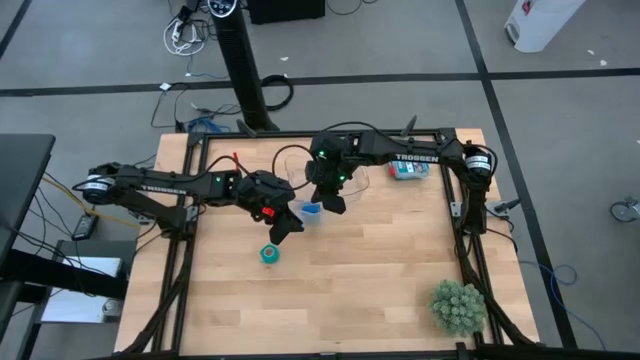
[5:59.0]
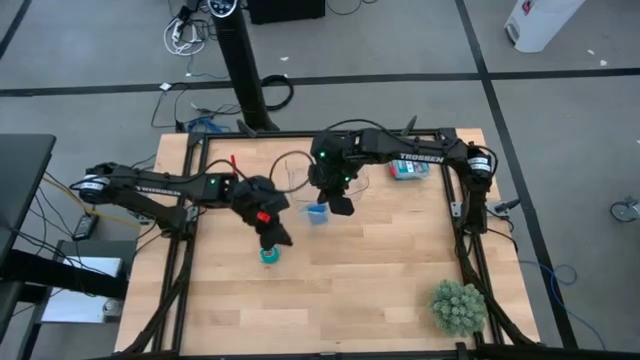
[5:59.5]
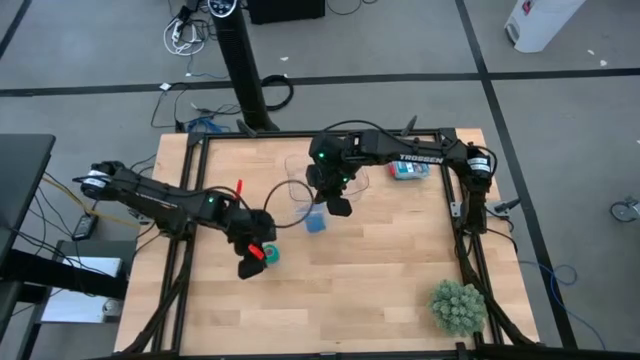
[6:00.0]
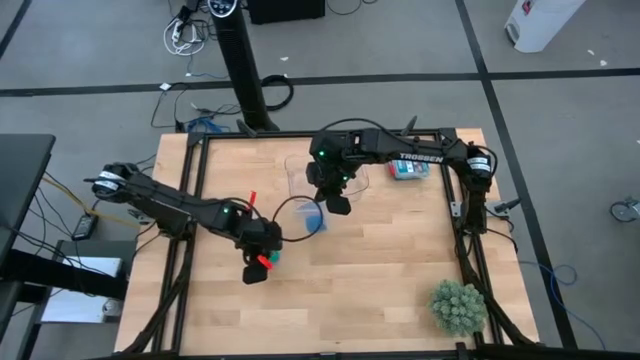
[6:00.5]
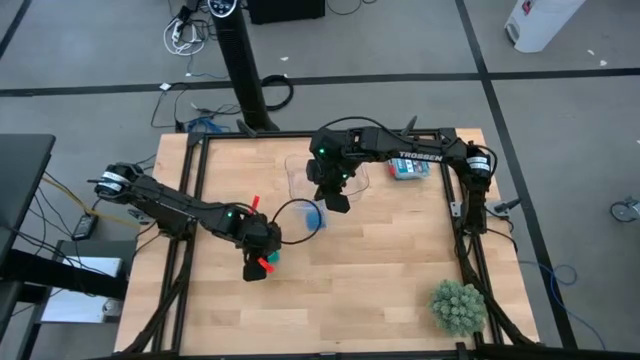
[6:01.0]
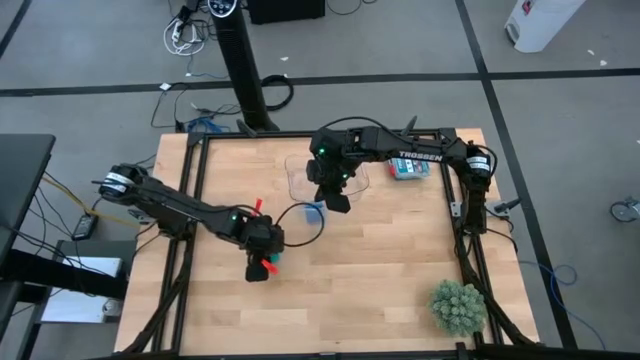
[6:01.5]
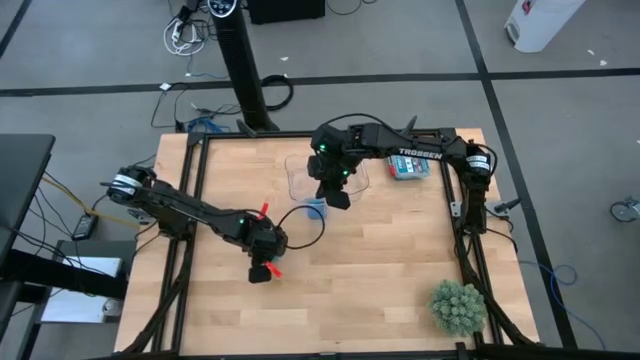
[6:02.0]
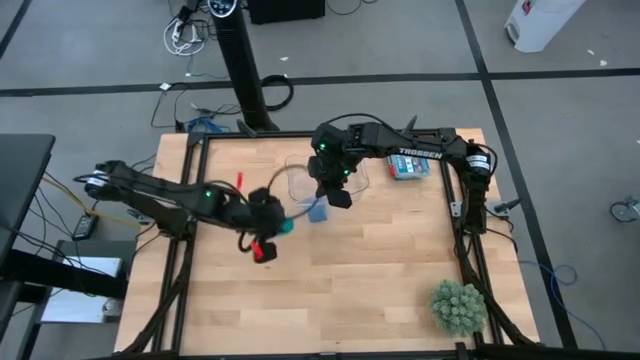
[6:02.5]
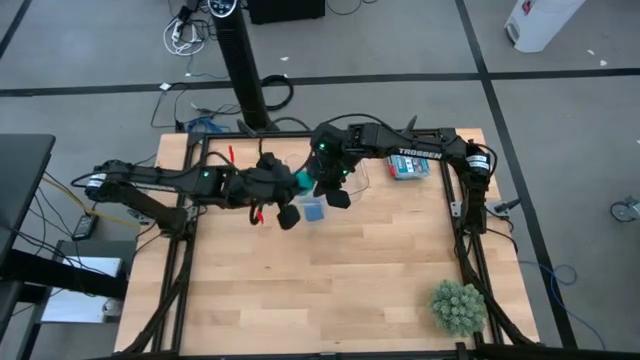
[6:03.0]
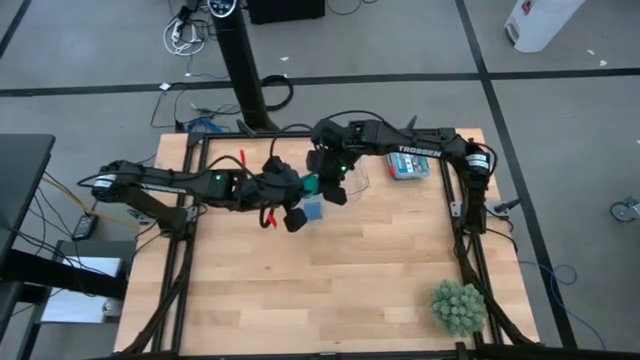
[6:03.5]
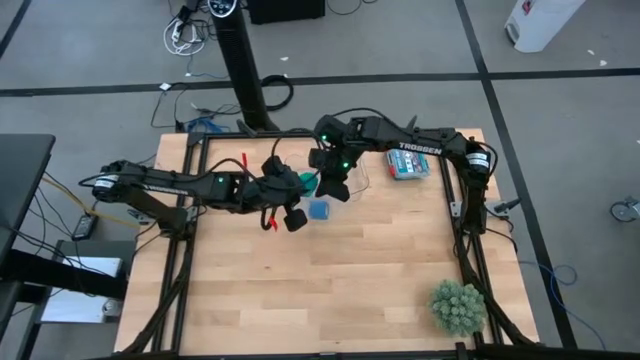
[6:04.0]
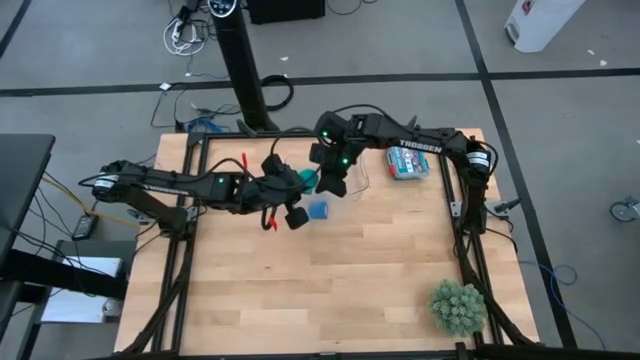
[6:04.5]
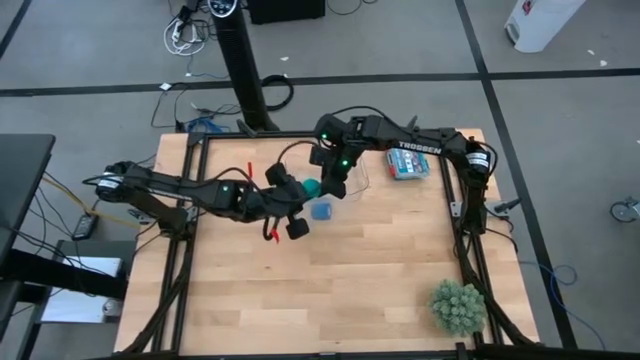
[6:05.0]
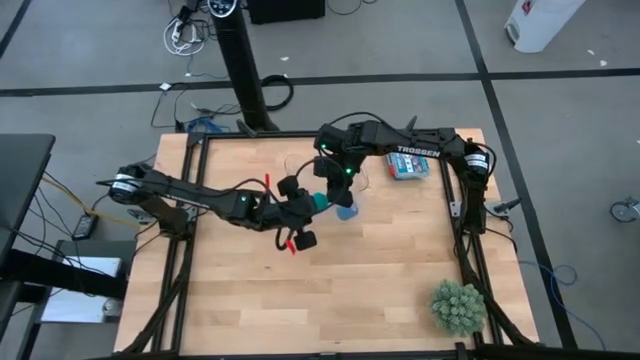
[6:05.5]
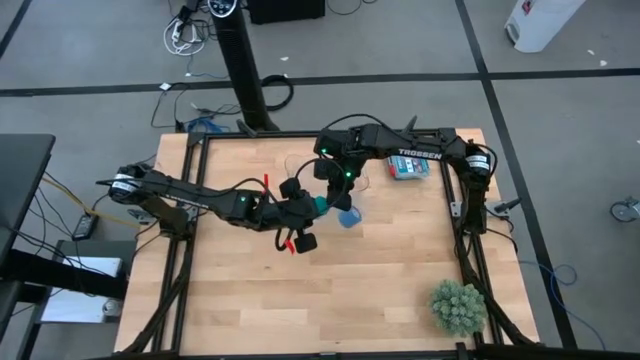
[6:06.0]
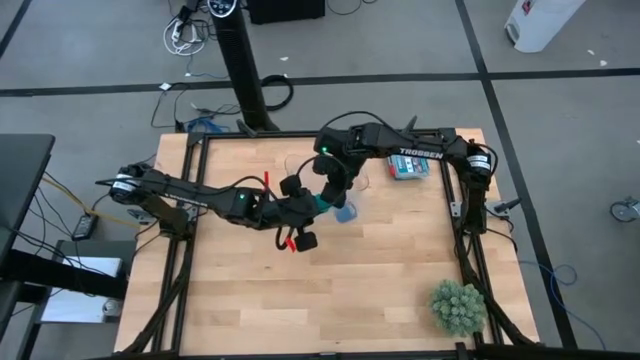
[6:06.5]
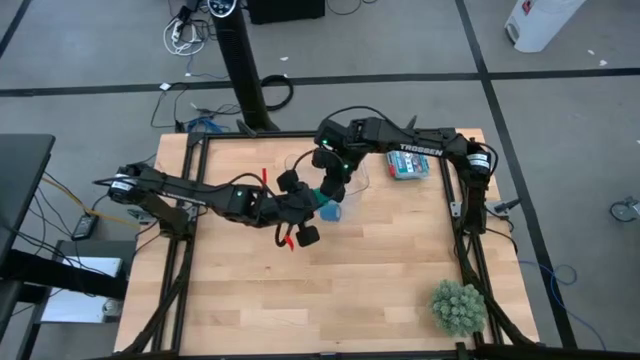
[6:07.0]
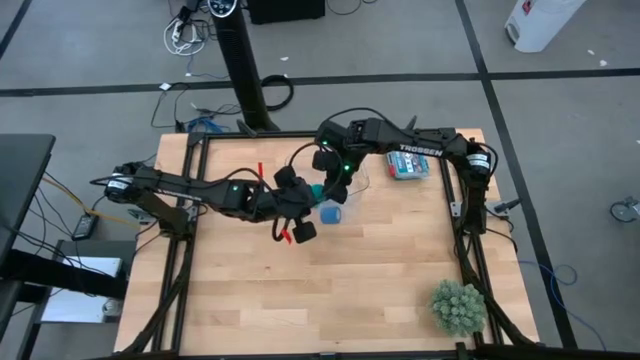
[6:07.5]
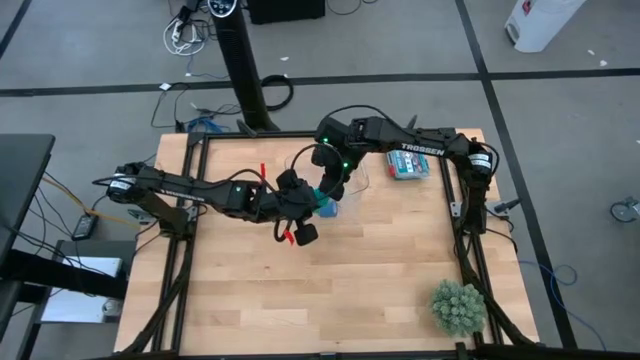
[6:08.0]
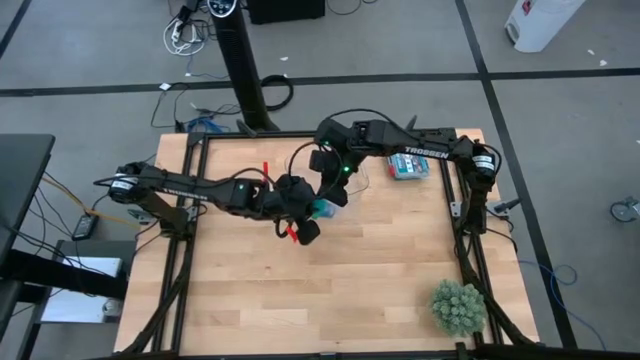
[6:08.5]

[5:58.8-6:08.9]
Task: Roll bandage
Put the sky blue bandage into the transparent zip bag

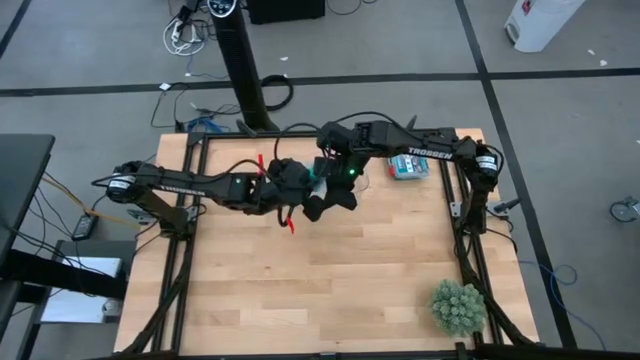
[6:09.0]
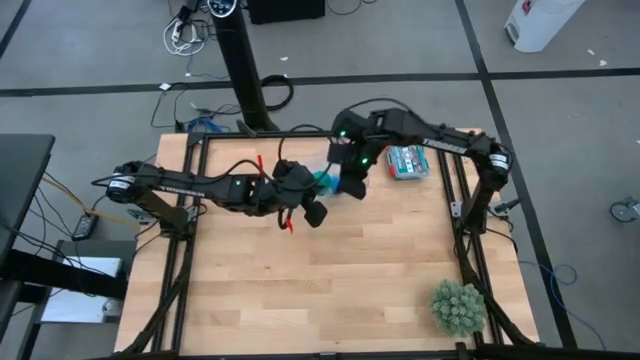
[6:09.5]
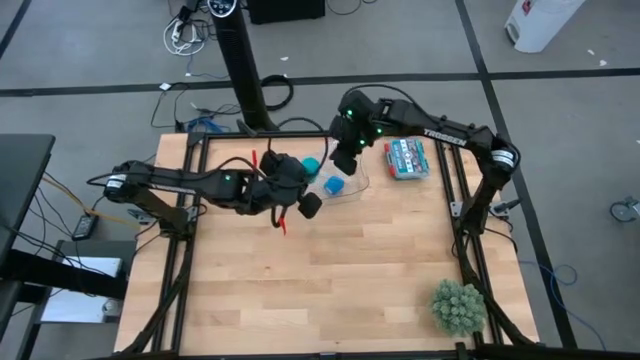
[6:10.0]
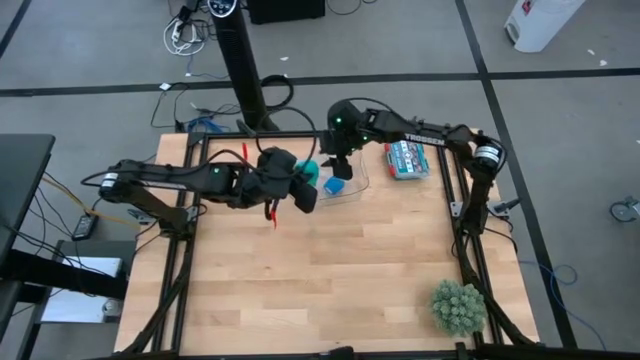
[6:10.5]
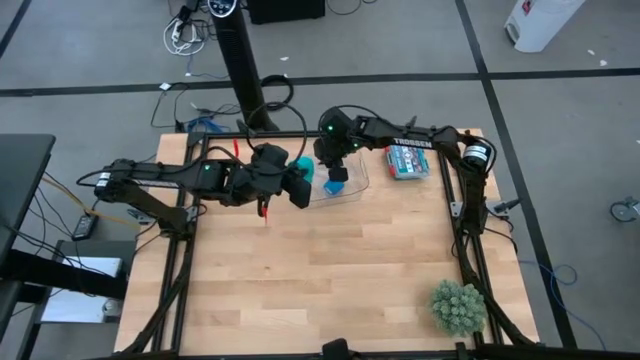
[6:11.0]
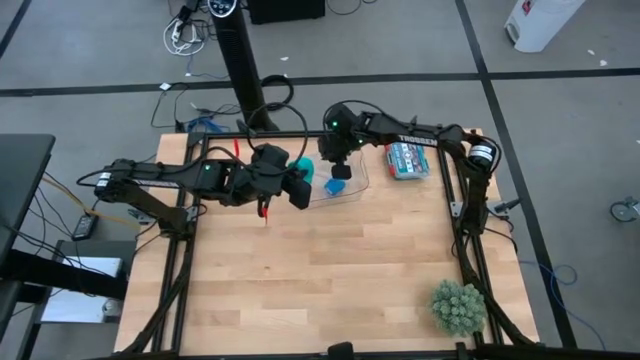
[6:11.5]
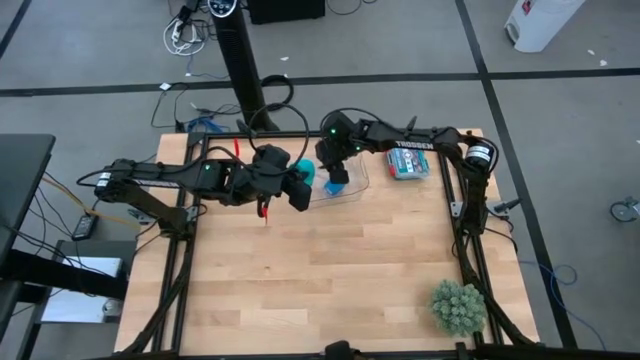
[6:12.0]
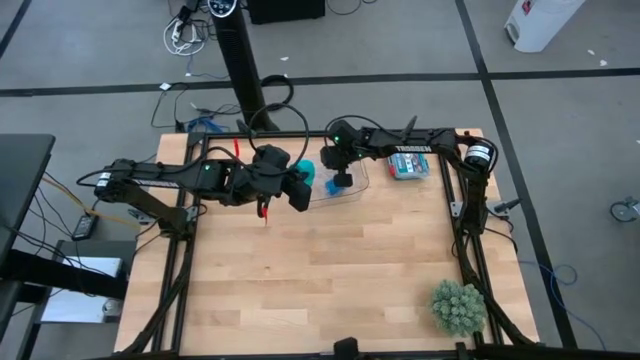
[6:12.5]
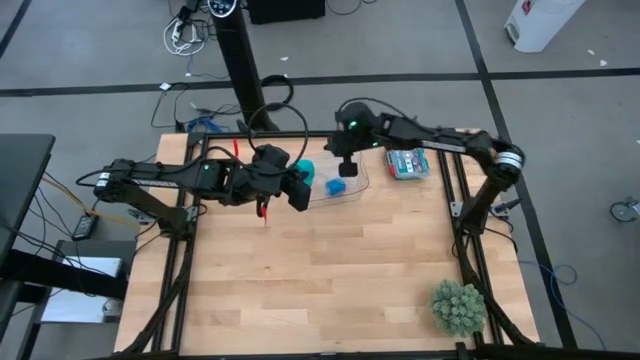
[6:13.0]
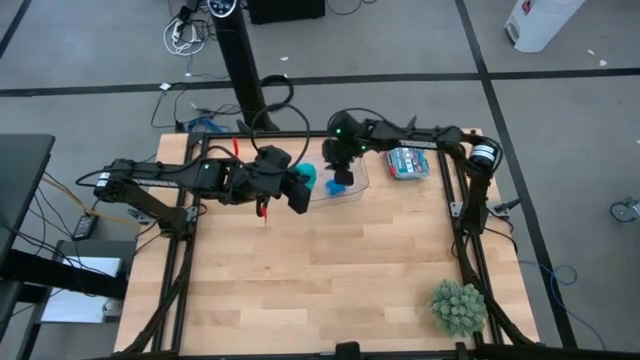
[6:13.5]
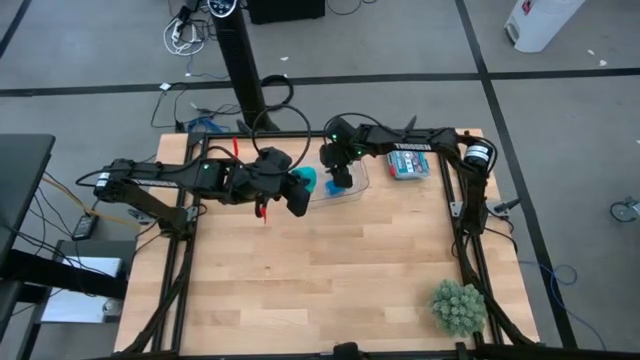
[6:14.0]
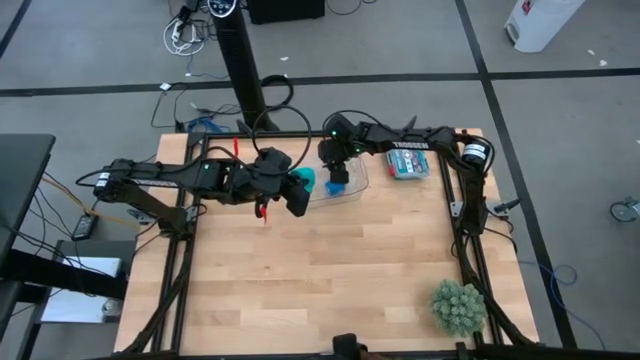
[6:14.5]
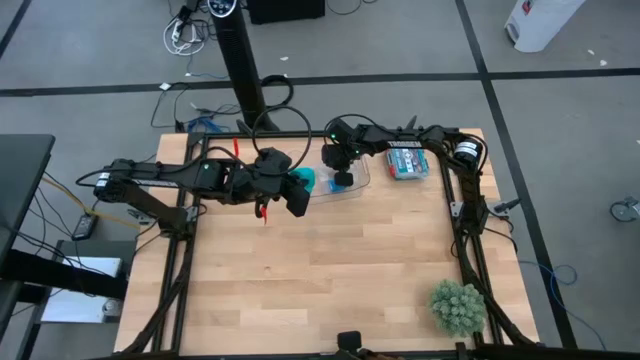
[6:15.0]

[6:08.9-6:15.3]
Put the sky blue bandage into the transparent zip bag

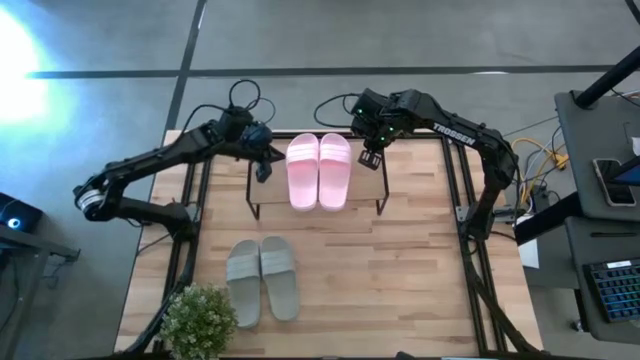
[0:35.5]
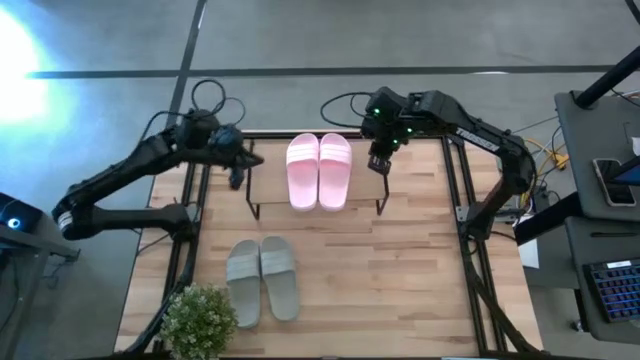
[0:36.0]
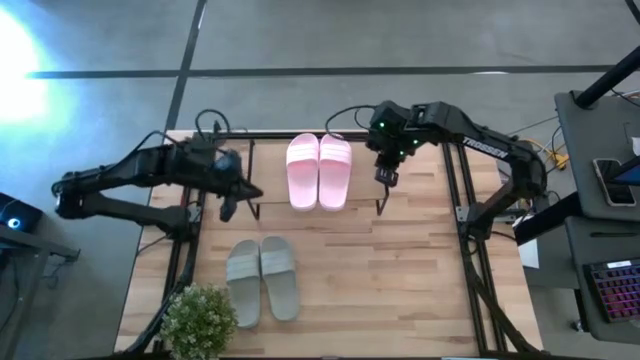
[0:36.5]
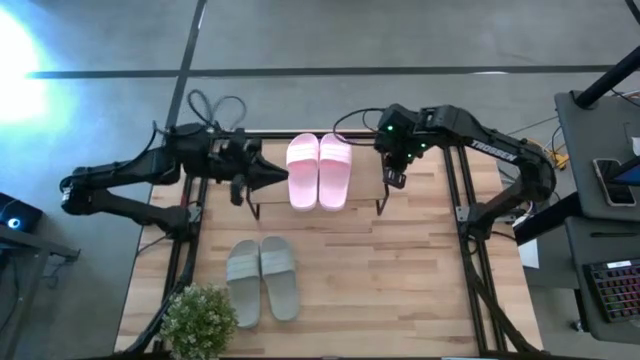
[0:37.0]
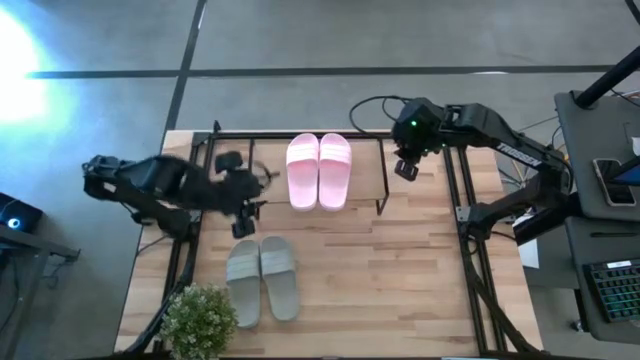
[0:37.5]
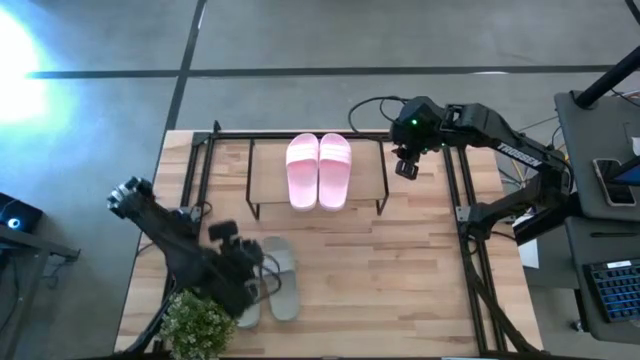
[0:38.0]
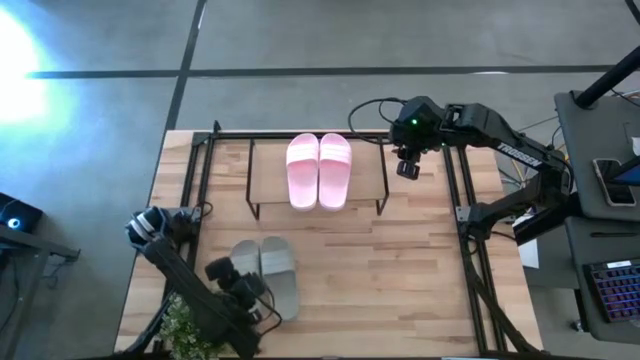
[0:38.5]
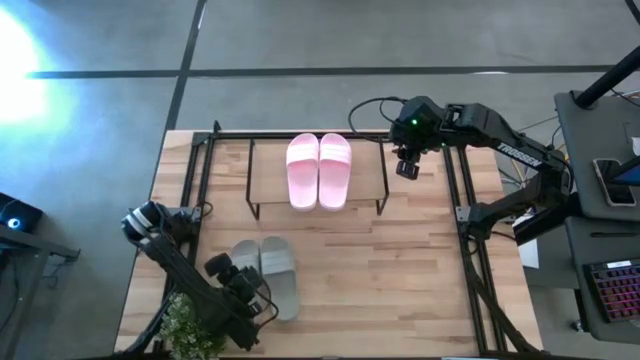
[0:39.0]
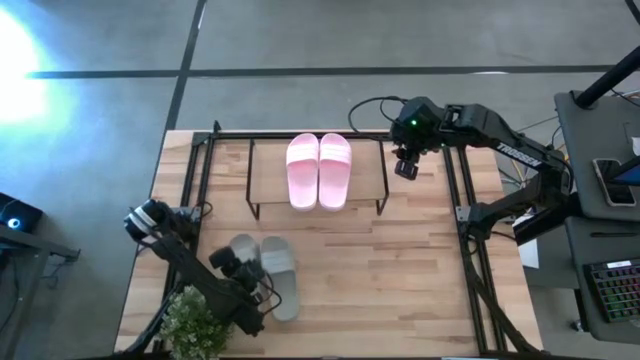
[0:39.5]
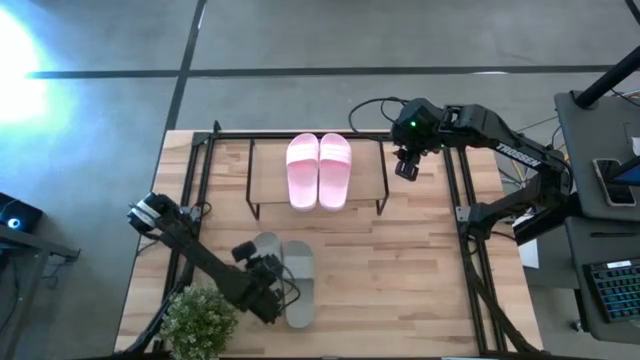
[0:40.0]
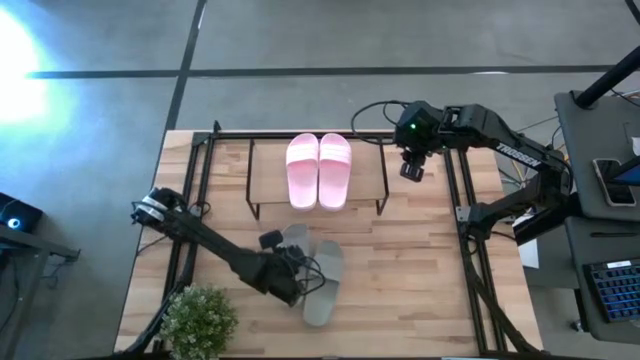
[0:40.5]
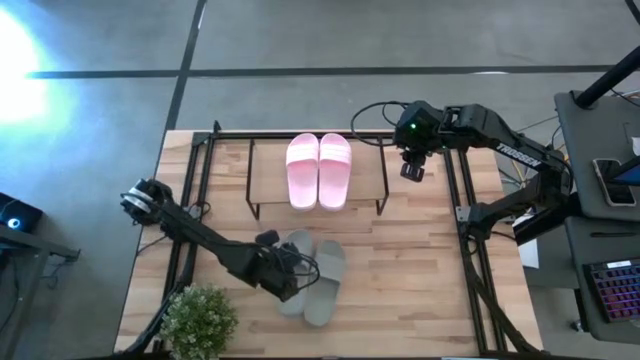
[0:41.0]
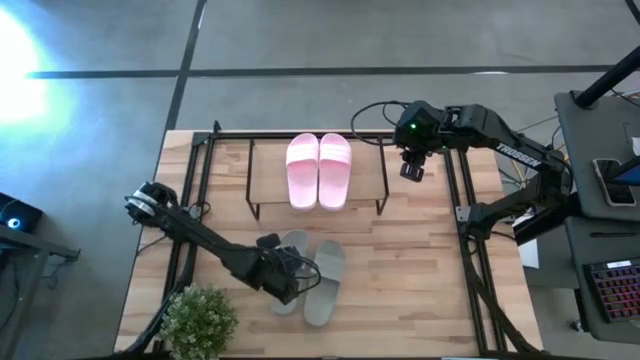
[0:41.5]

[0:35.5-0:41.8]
Task: Pick and place slides into the shelf
Prepare the gray slides
